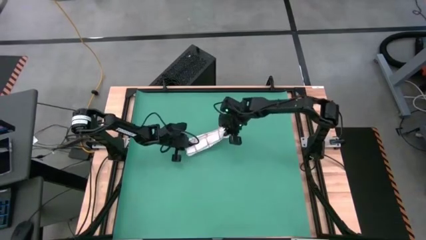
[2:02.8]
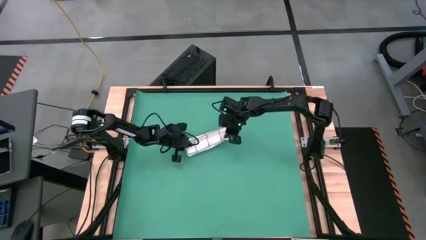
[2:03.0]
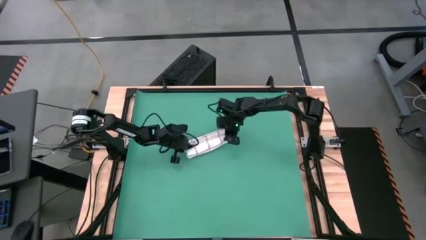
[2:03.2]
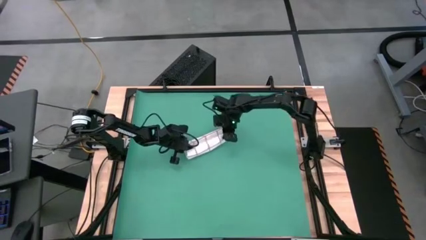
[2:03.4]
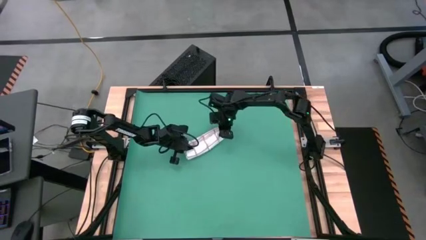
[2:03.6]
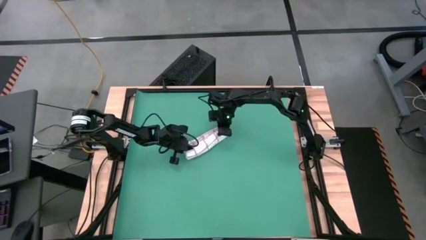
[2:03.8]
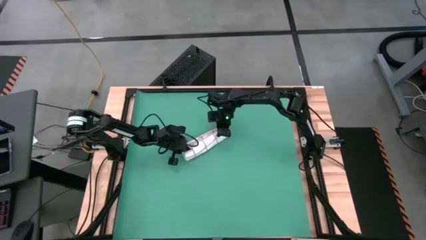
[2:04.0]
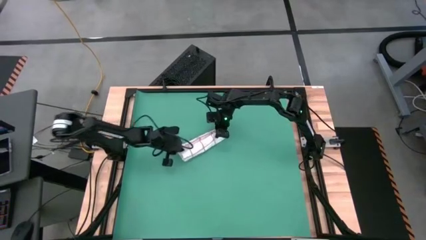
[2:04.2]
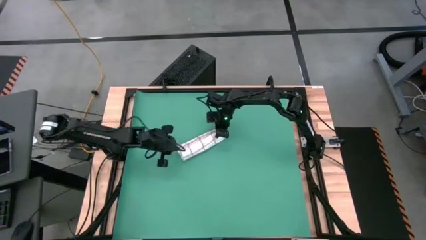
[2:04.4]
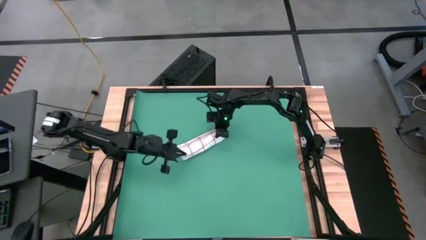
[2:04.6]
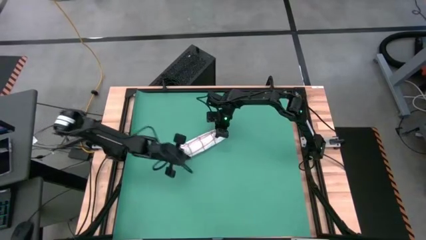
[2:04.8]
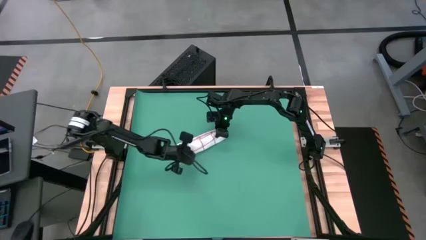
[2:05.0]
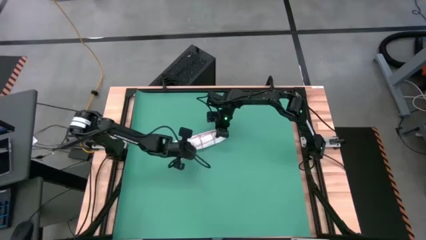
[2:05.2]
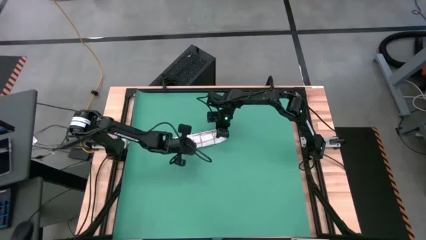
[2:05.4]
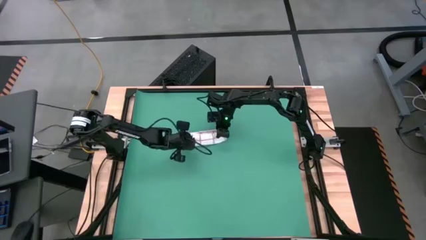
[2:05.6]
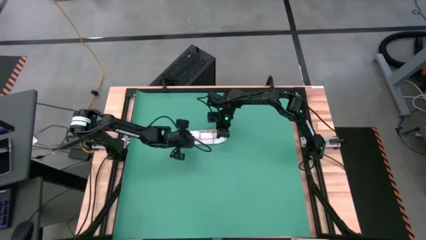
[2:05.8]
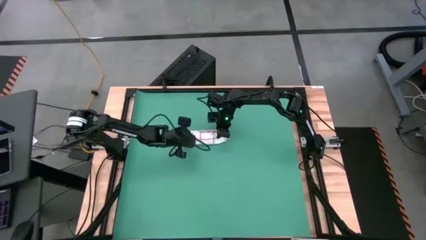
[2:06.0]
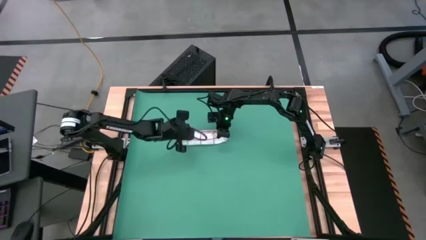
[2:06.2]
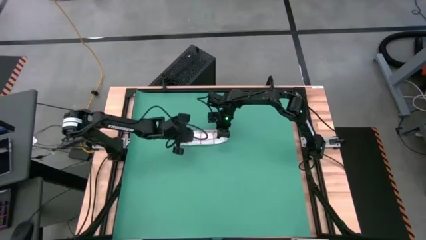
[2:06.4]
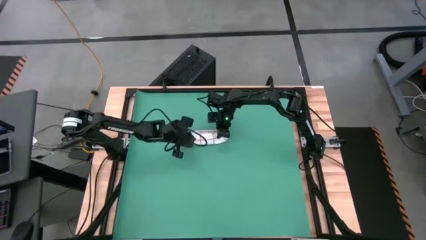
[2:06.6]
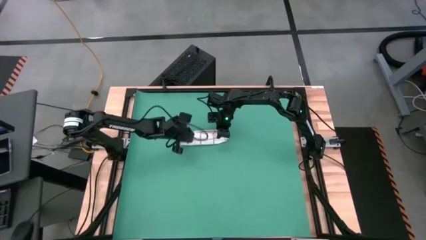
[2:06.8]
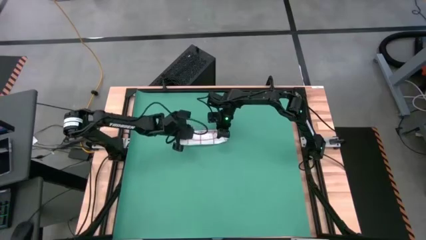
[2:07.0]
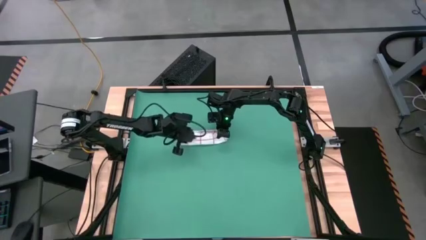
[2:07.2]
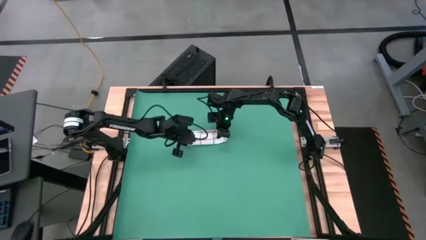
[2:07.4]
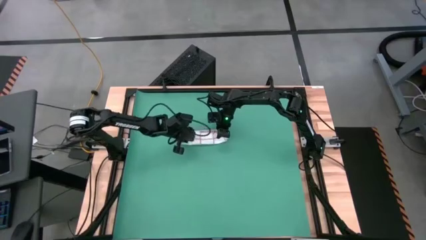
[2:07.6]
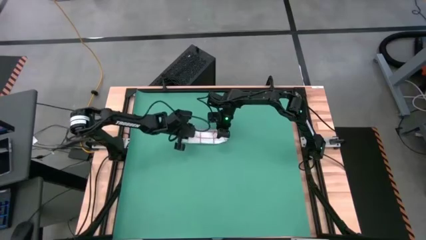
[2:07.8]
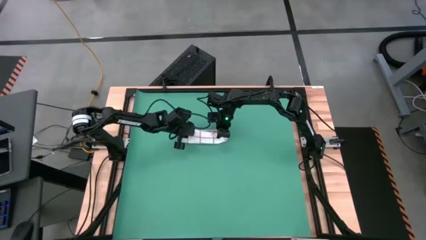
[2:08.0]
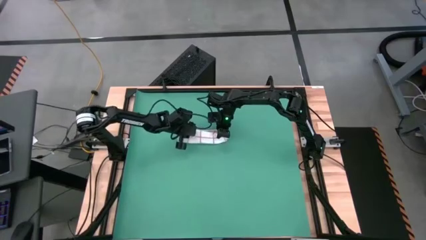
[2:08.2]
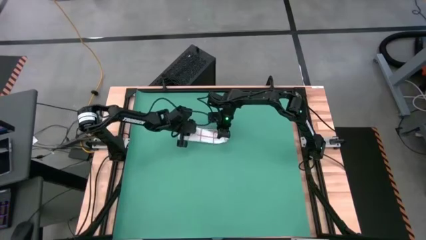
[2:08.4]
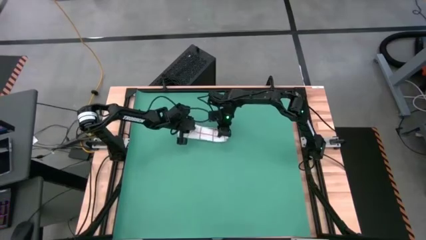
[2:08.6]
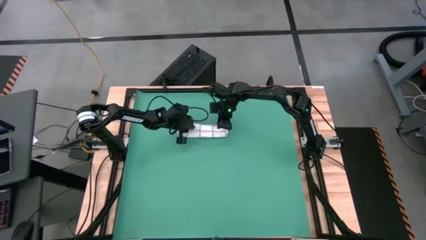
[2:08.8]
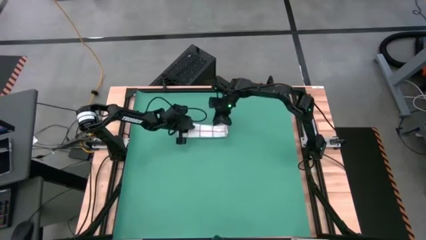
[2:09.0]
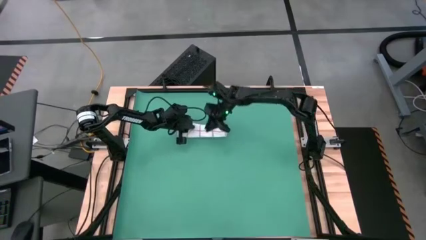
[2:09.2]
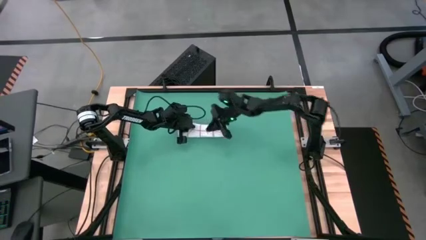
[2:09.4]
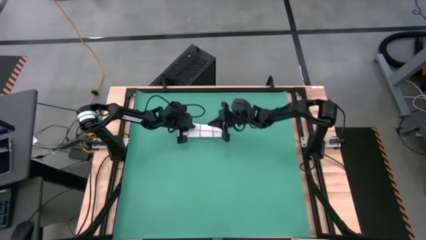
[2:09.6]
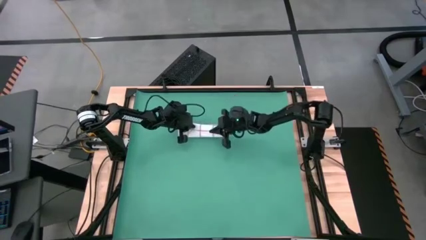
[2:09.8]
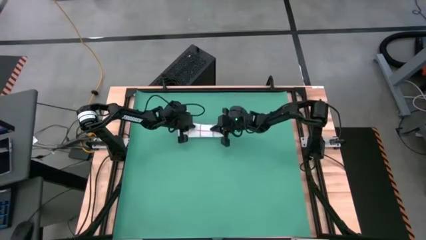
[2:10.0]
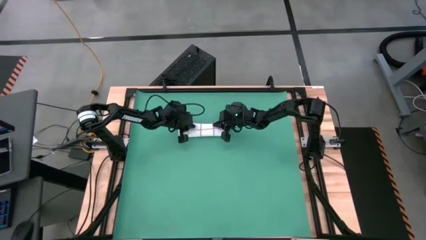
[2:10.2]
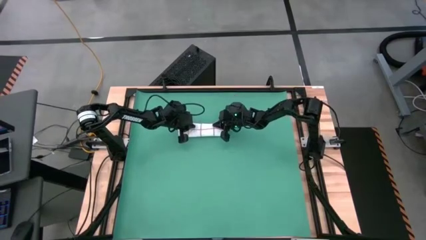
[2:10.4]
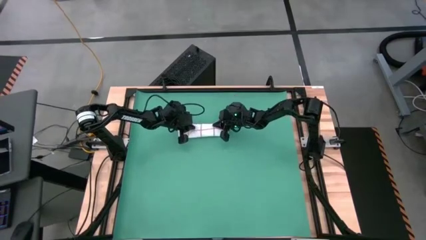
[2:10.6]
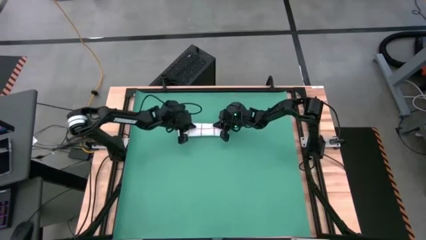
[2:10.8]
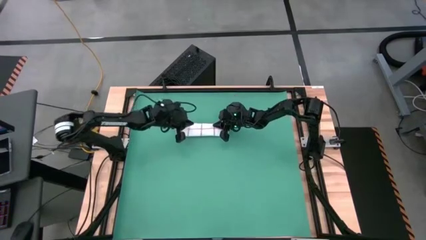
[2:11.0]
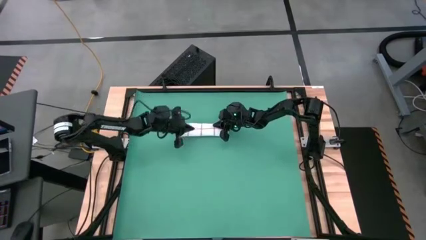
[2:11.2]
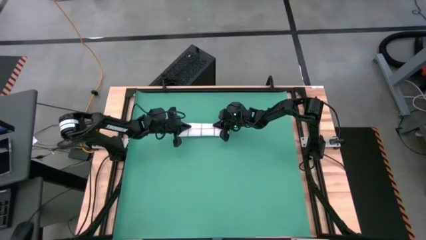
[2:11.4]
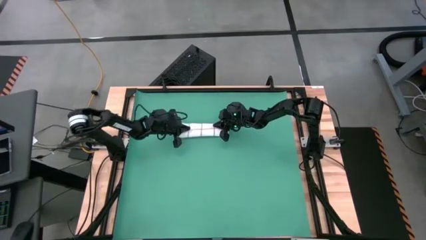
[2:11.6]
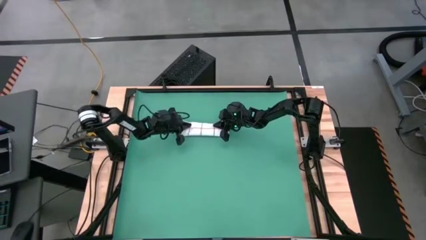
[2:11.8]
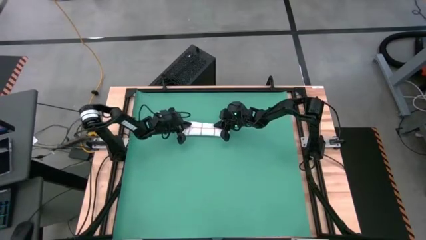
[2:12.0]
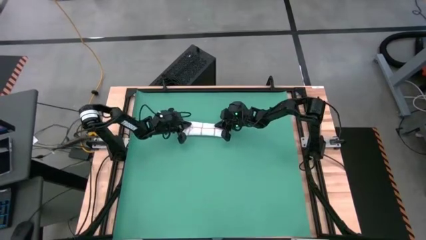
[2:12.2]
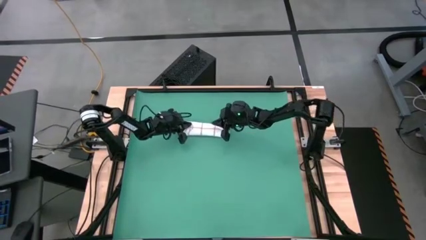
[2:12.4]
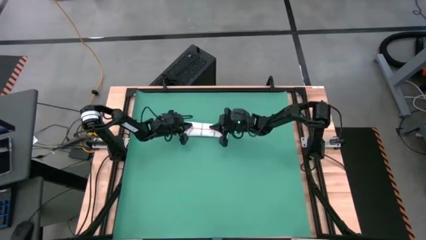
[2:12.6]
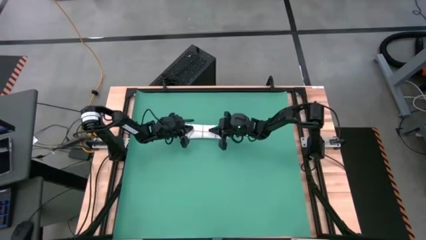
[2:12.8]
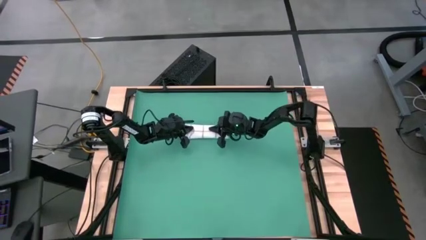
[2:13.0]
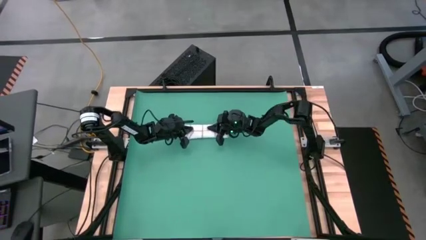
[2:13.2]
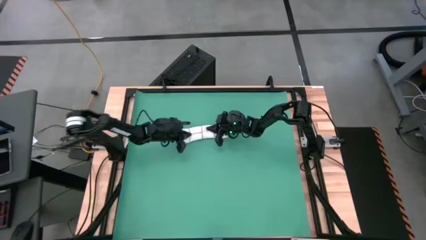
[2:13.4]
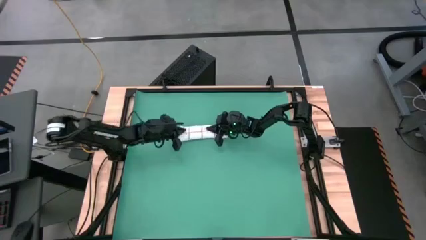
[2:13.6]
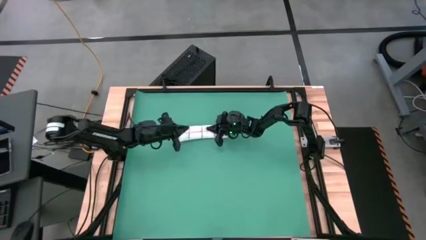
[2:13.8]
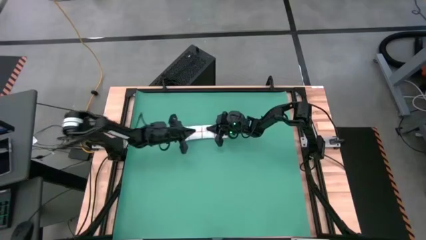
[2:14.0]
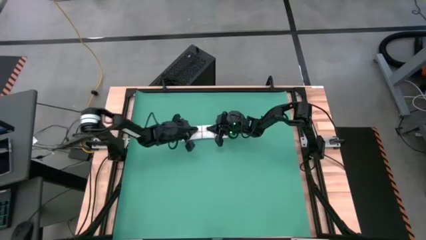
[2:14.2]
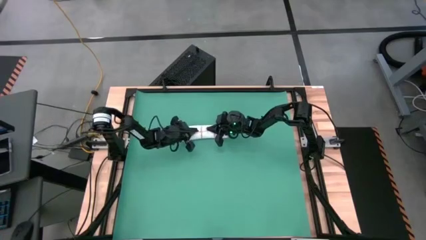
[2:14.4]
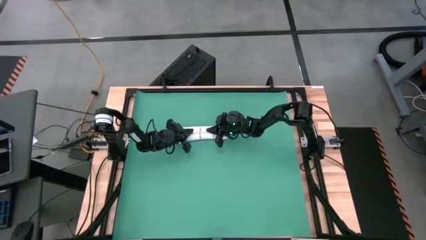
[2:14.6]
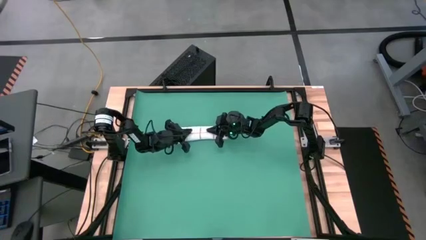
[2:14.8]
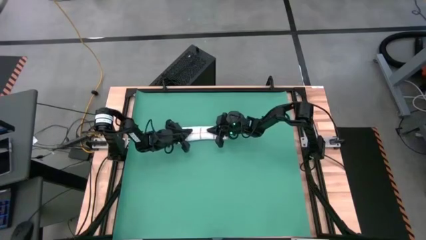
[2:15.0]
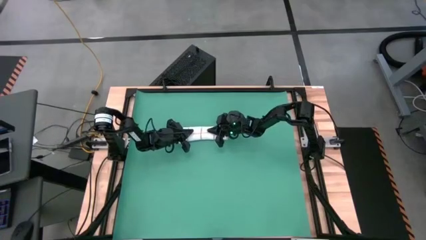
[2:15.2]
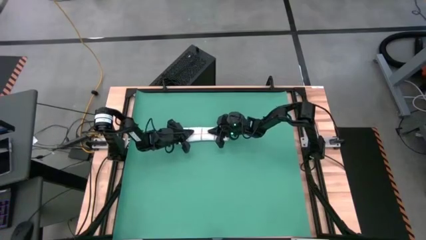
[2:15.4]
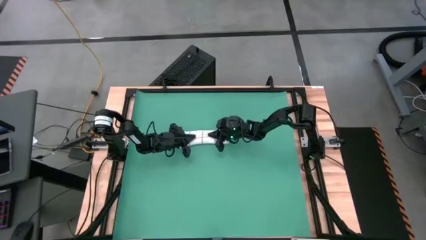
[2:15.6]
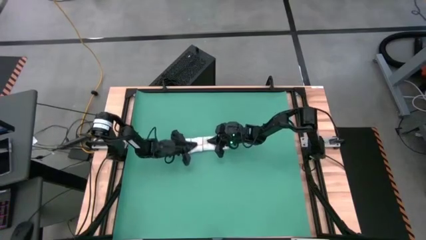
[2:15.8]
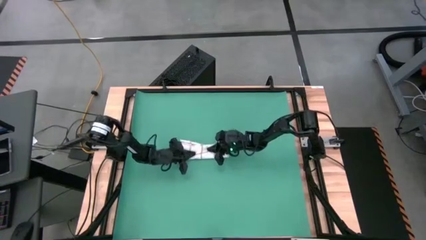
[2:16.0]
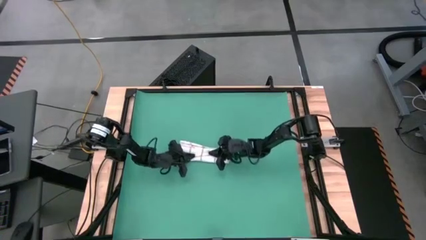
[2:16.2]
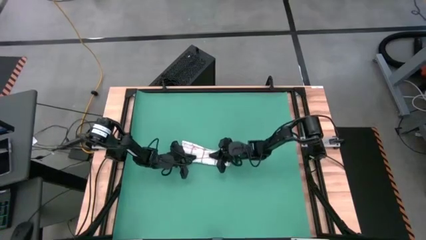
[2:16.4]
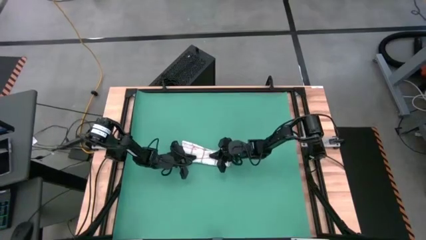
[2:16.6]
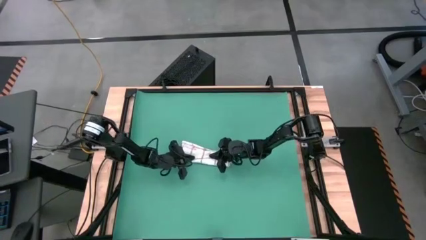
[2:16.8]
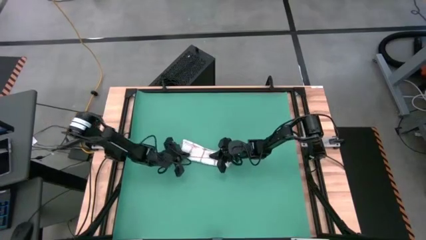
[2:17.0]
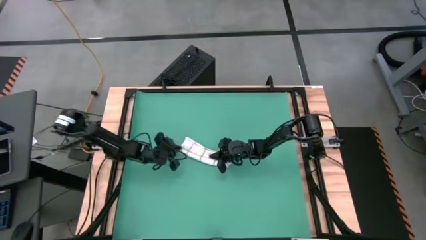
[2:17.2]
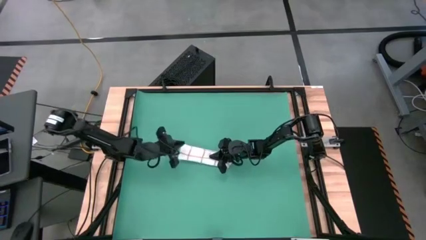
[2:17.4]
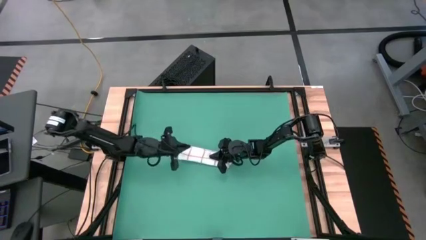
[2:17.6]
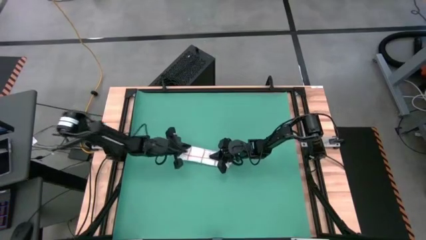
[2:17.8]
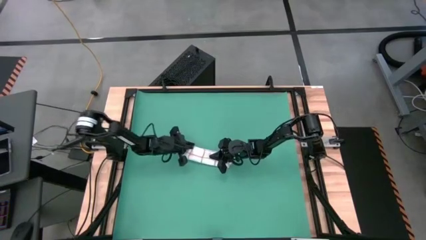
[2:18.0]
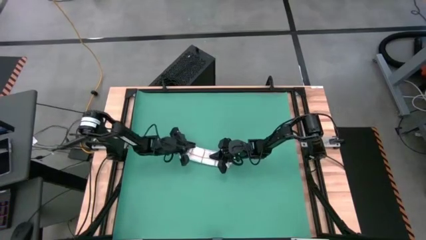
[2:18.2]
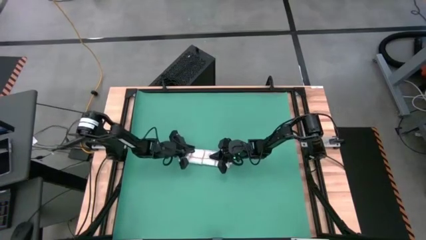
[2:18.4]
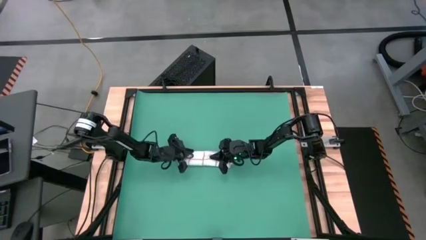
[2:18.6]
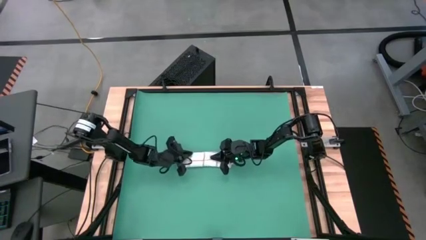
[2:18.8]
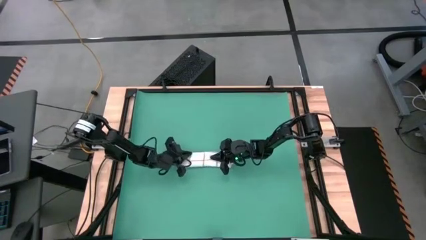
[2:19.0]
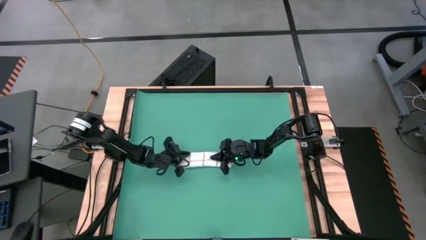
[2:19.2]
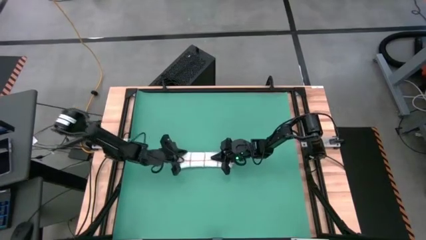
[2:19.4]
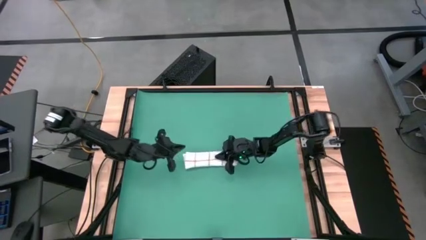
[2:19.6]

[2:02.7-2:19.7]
Task: Roll towel
Roll the white towel
